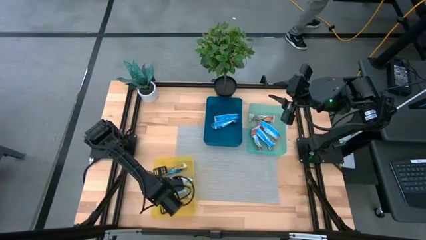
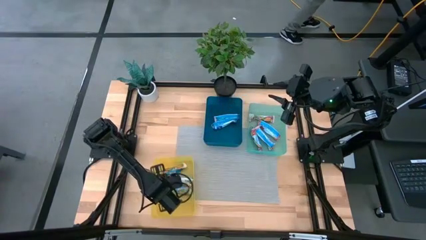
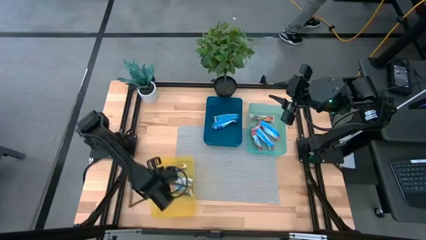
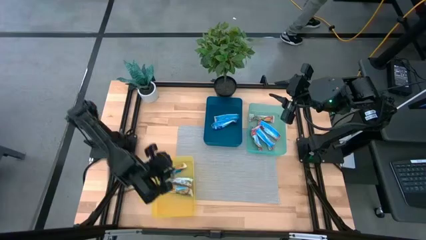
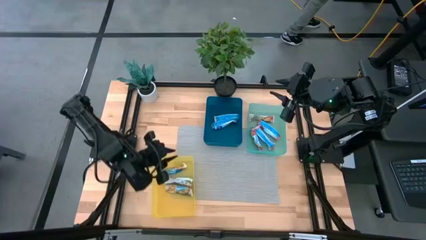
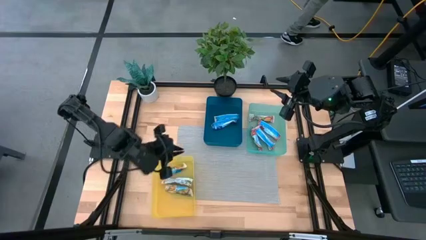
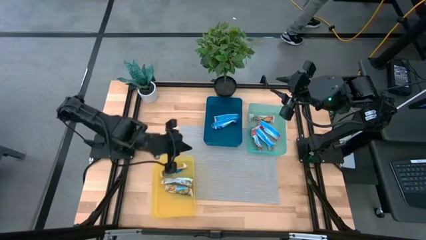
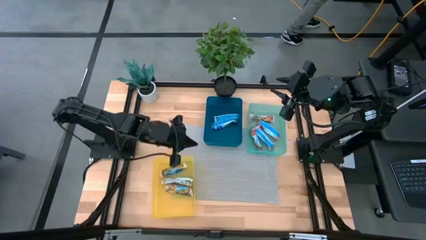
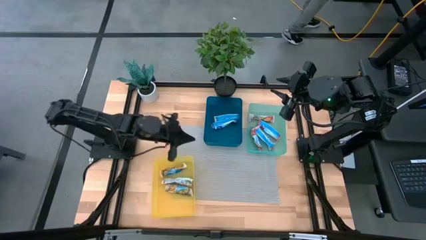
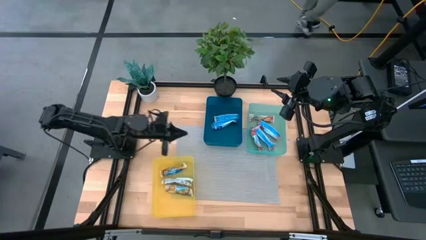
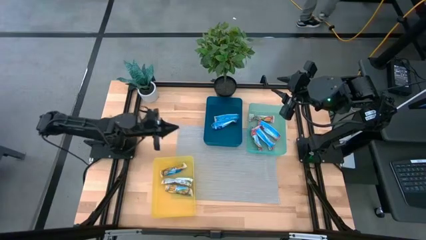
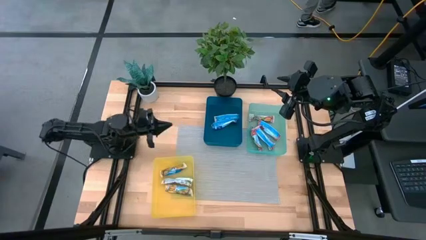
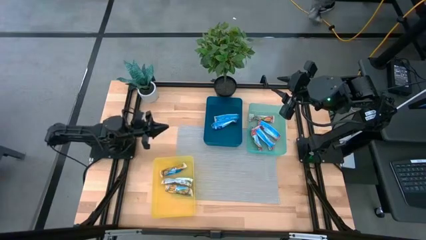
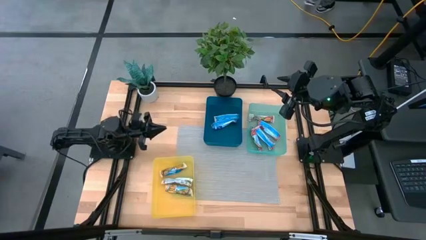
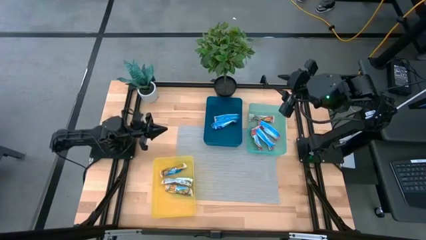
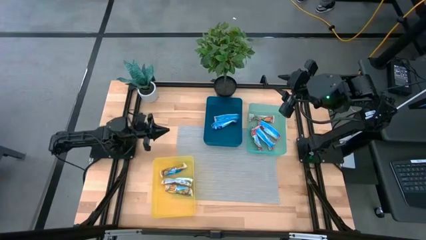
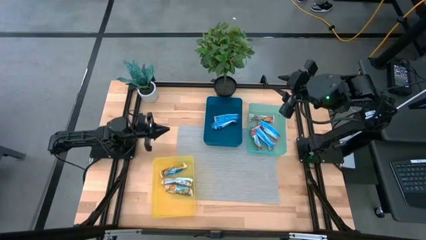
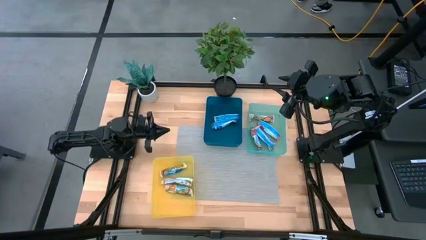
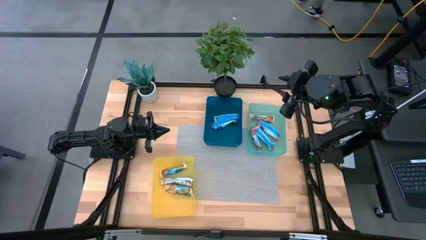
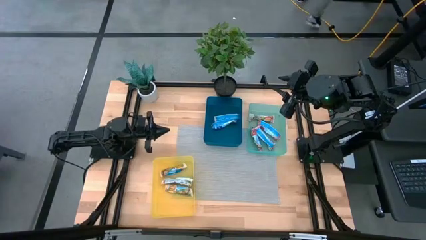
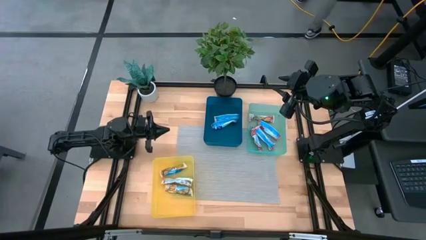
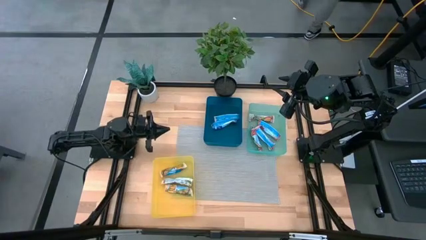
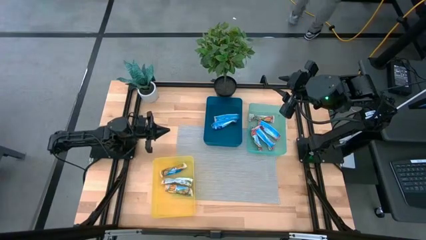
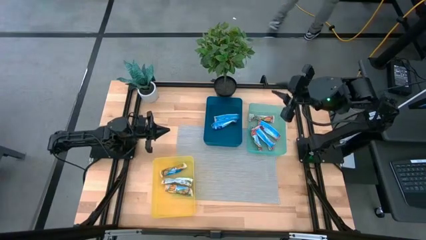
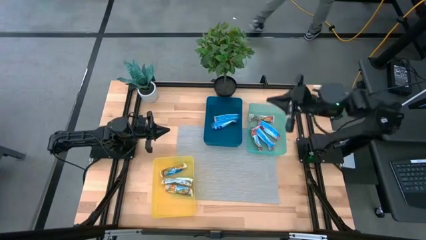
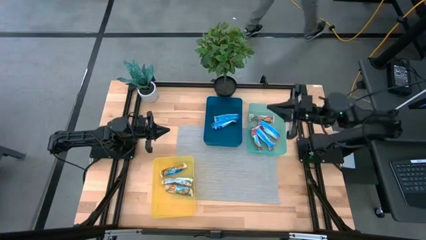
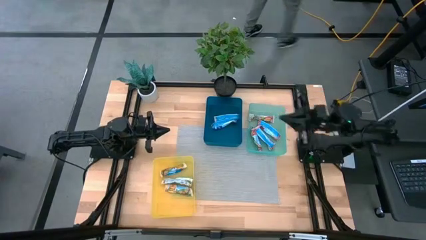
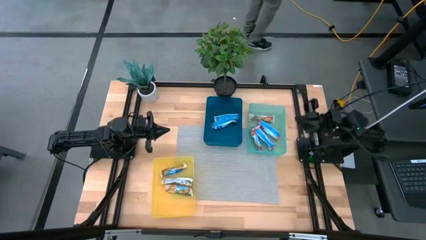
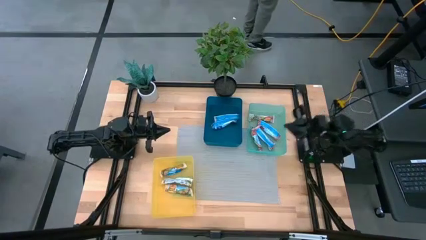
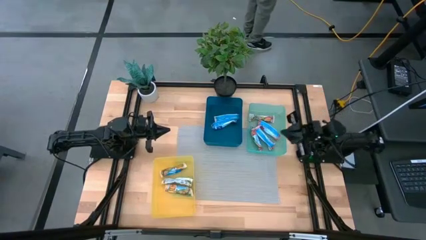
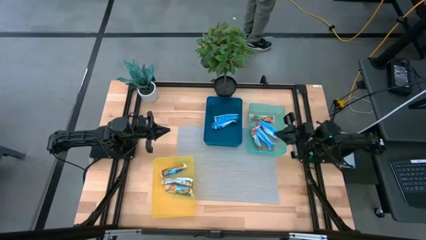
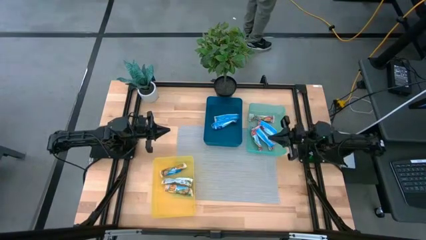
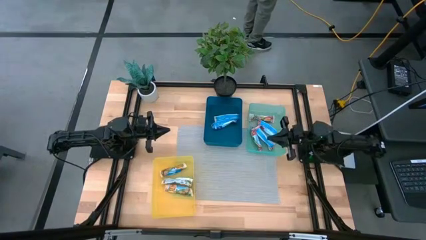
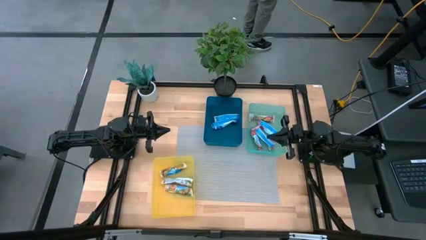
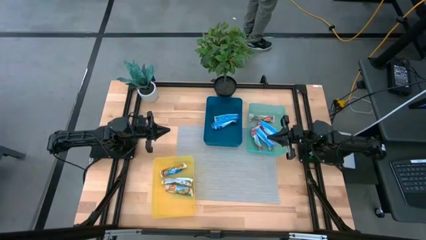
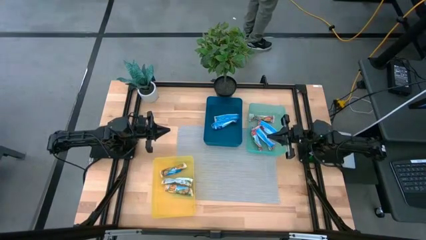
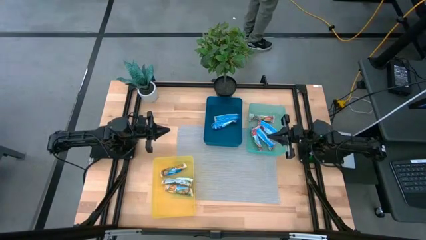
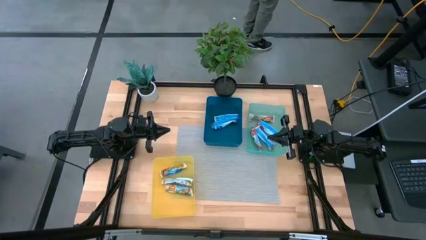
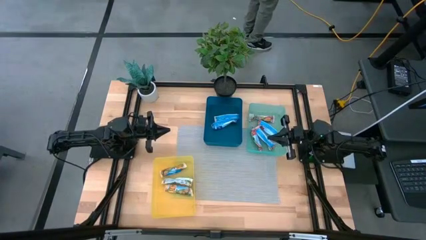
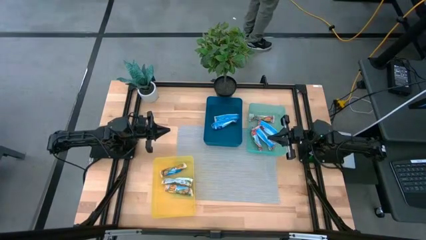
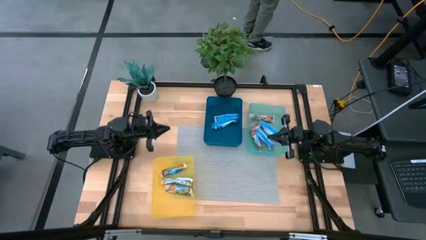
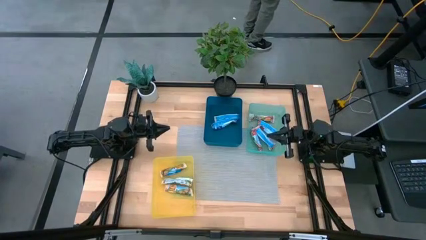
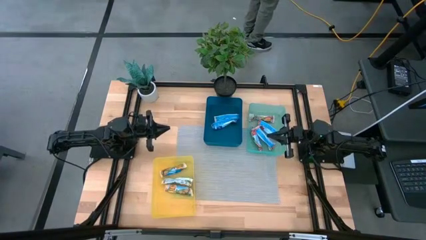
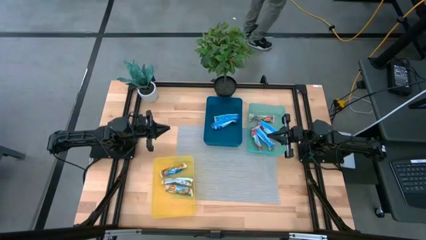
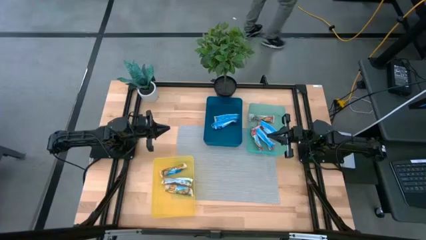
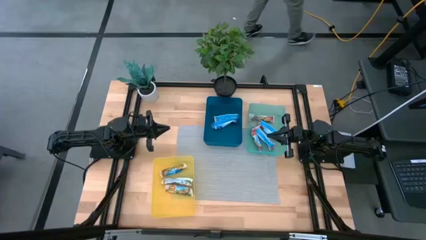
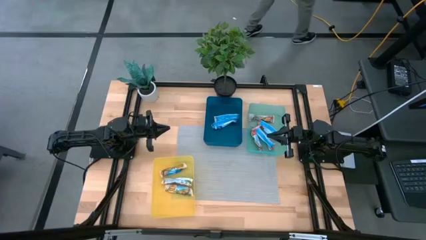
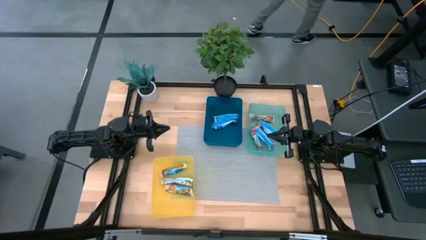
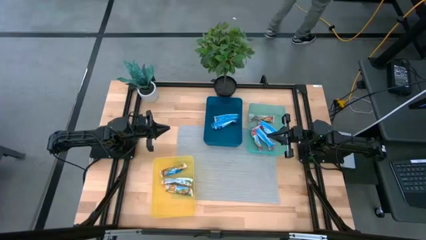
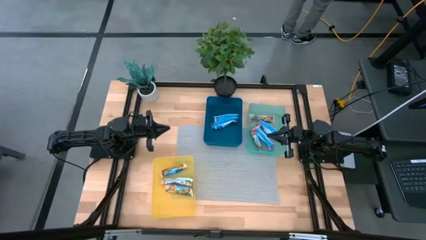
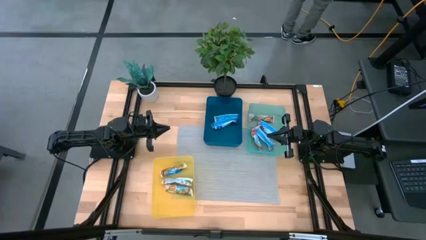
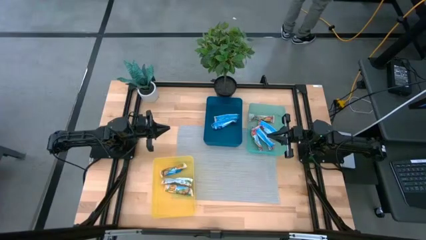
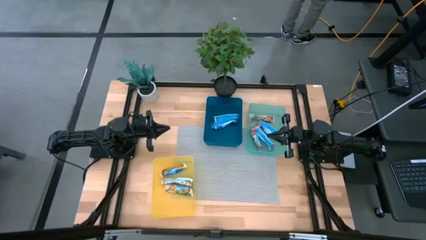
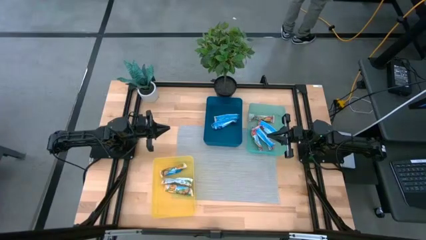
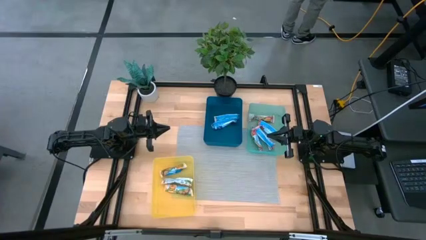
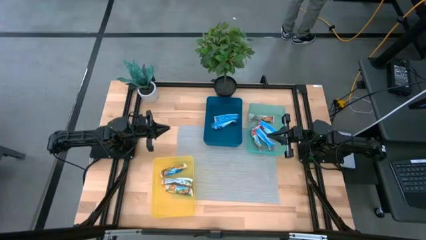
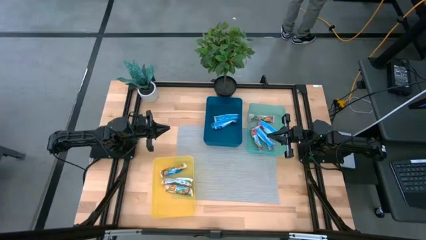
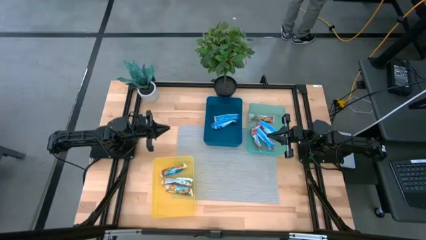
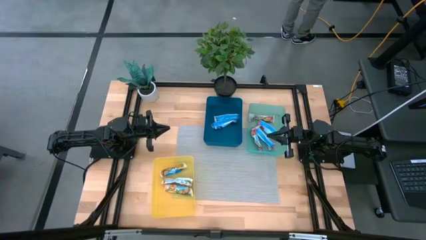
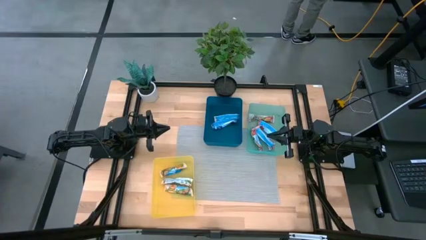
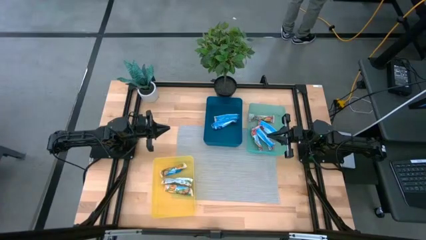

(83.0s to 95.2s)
Task: Pick and place Granola Bars by type
Return to Home Position

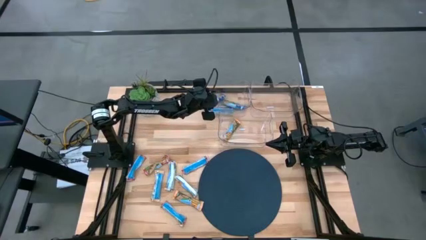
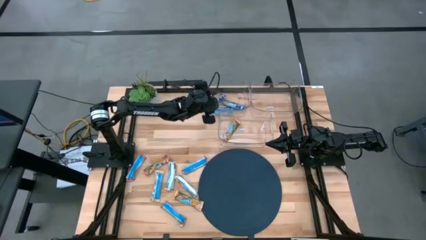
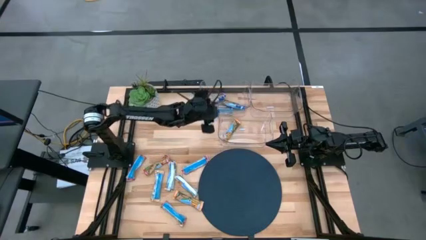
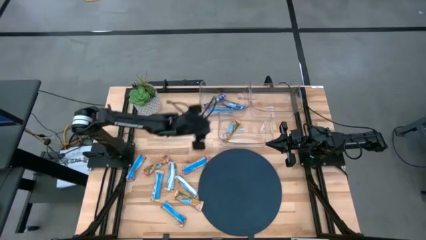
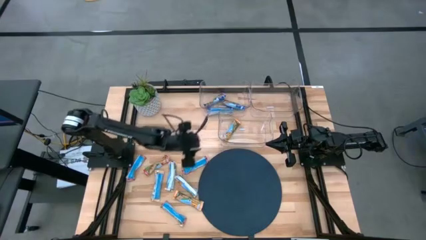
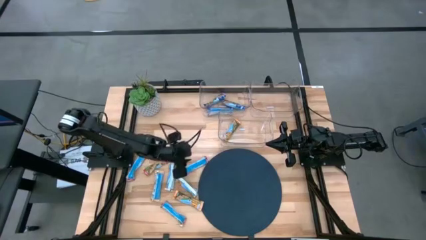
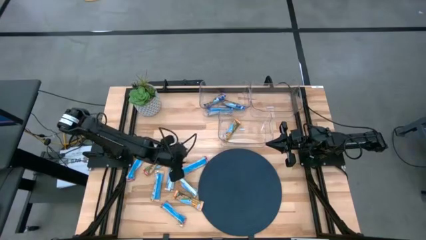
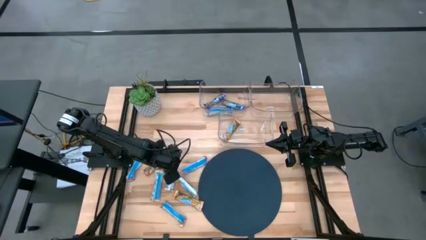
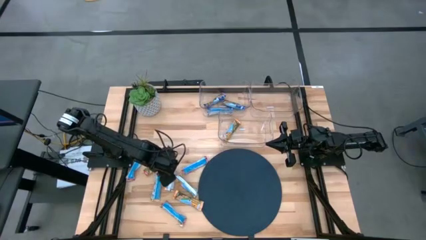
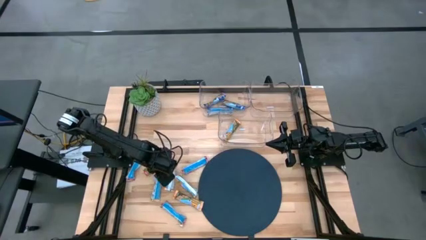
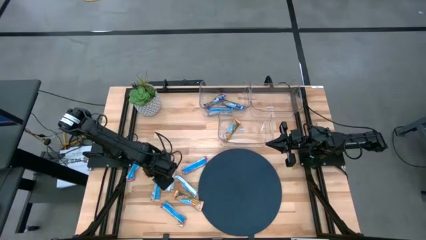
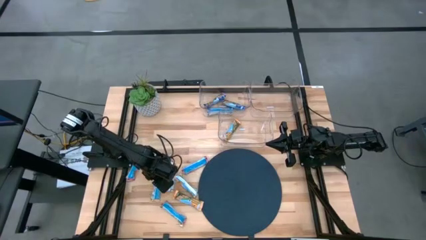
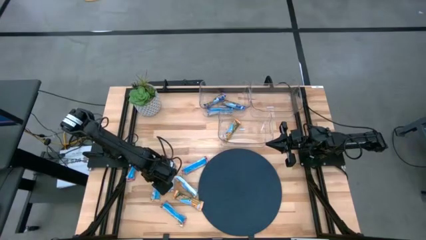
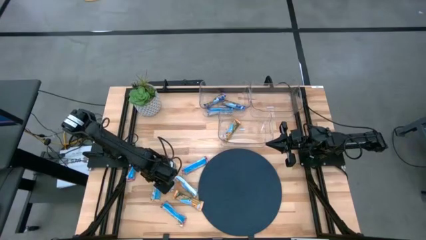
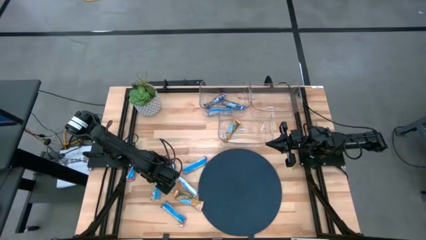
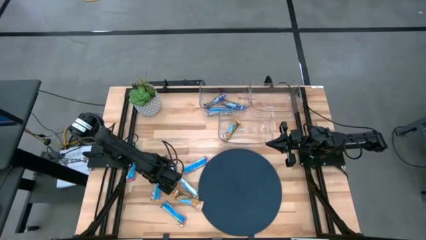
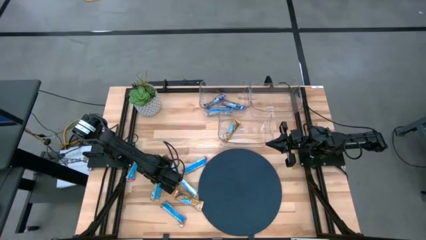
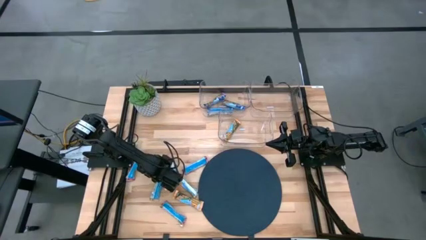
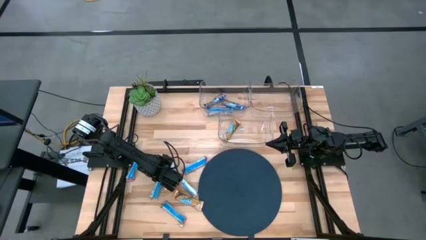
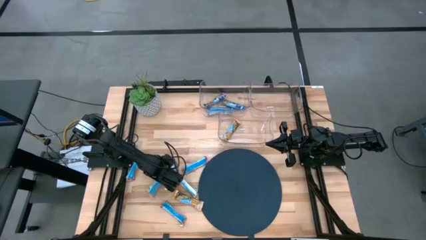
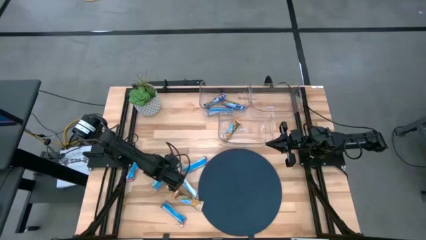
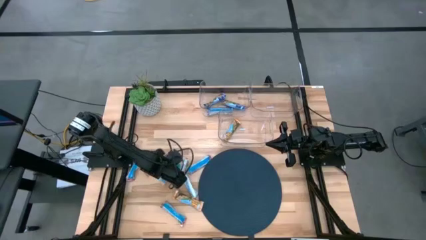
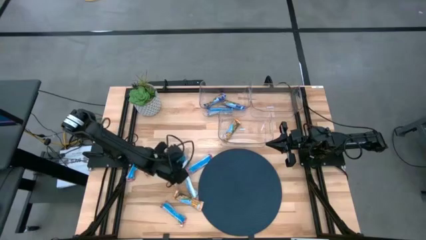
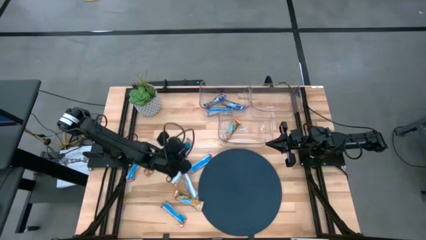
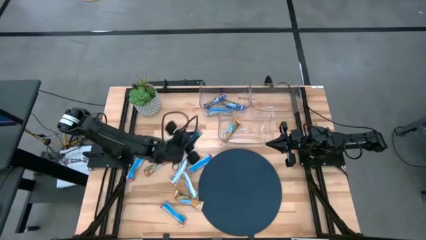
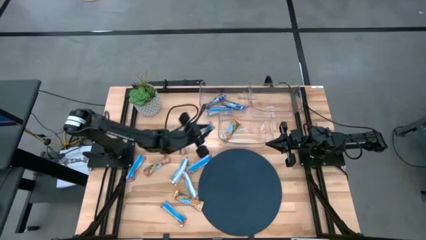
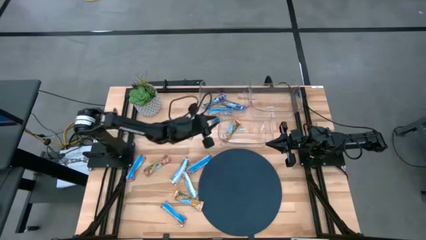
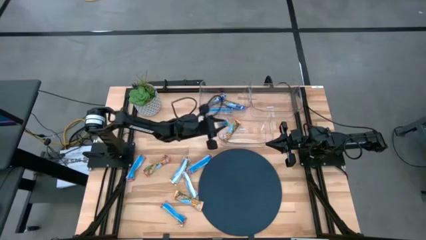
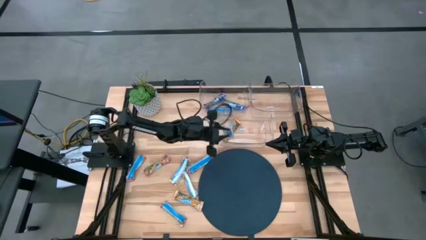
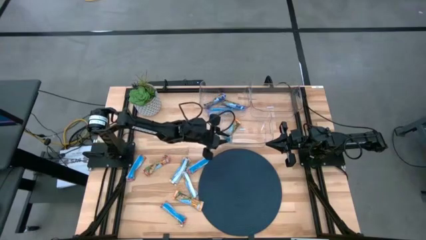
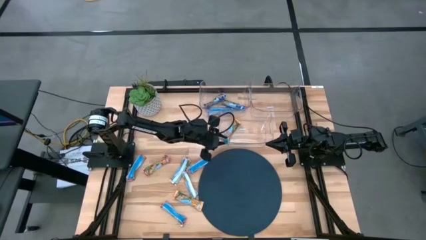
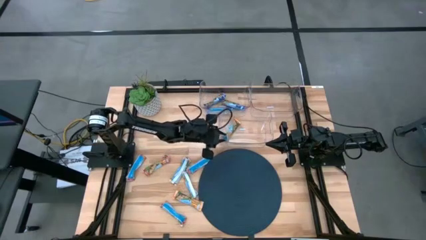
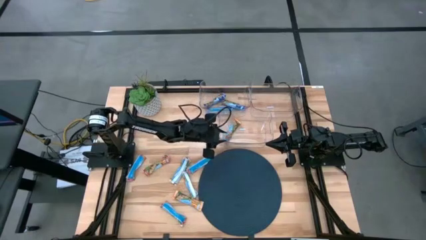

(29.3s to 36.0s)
Task: Pick and place Granola Bars by type
Put the yellow granola bar into the bottom transparent bin
